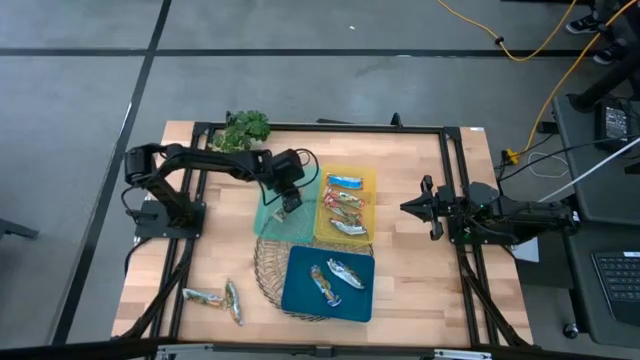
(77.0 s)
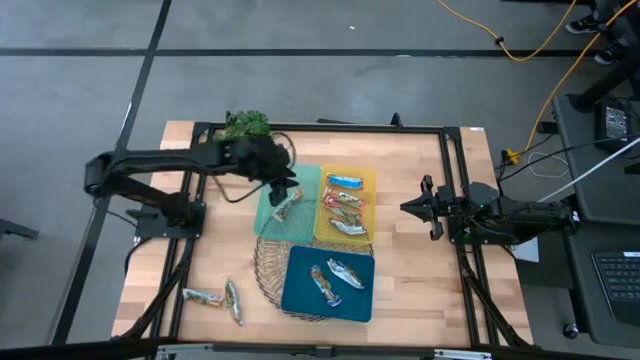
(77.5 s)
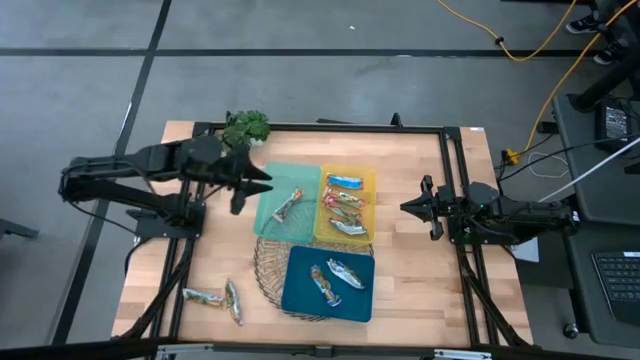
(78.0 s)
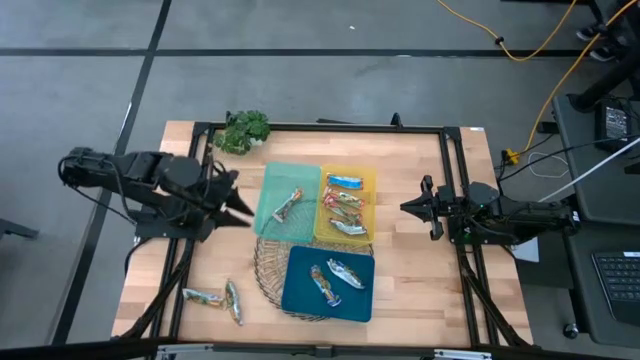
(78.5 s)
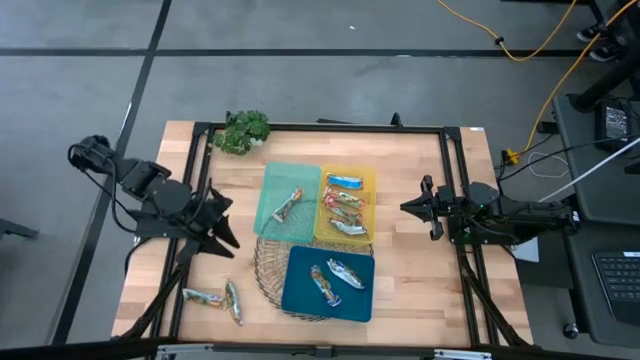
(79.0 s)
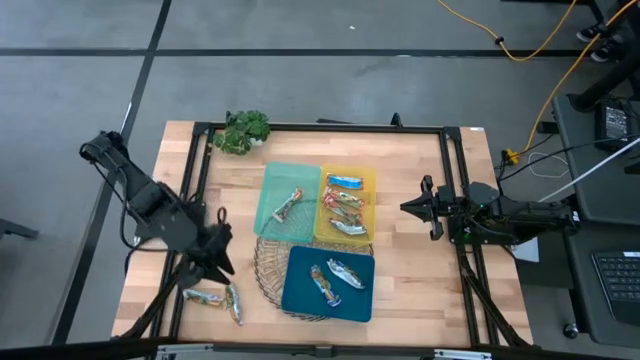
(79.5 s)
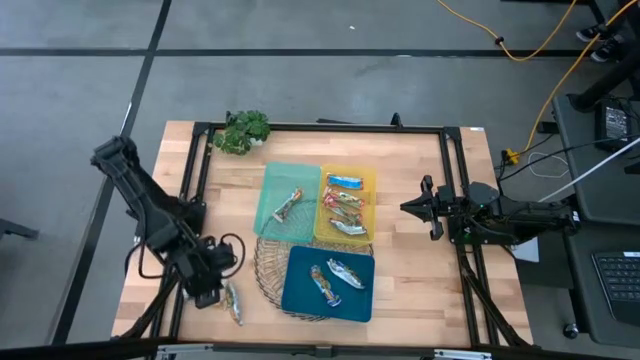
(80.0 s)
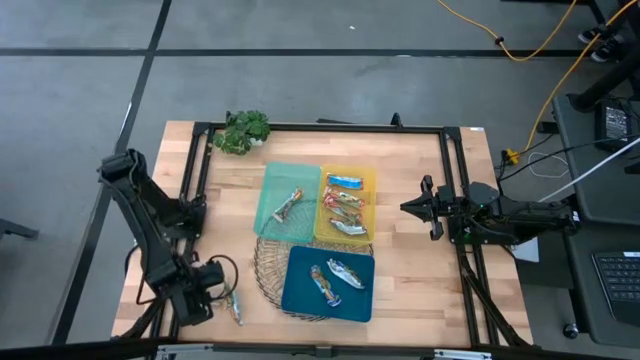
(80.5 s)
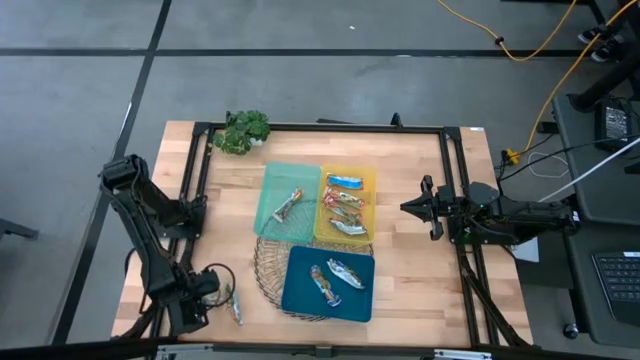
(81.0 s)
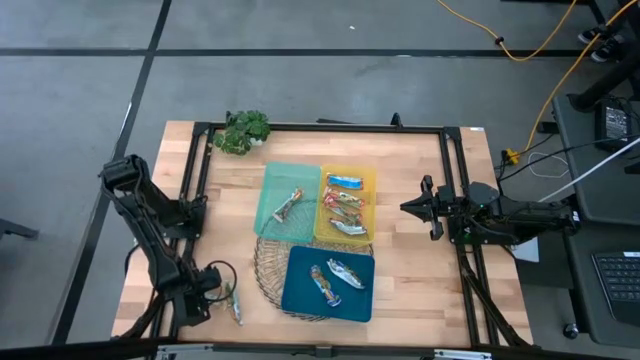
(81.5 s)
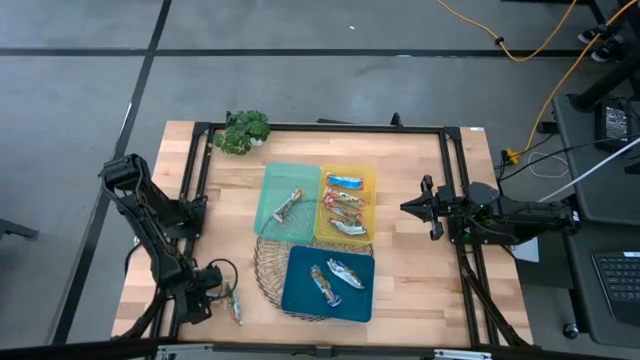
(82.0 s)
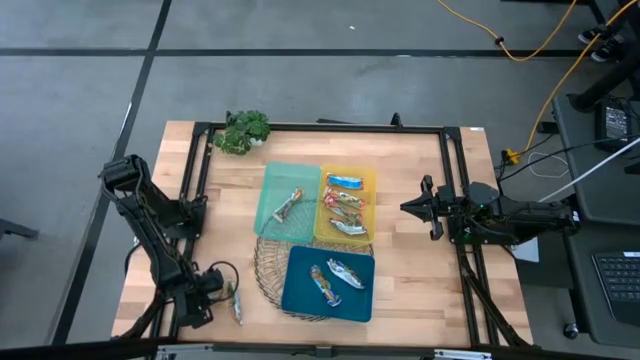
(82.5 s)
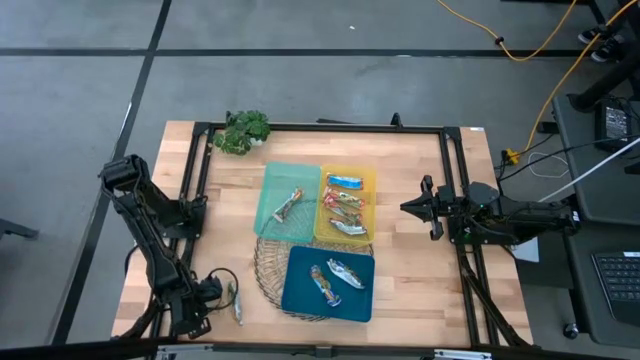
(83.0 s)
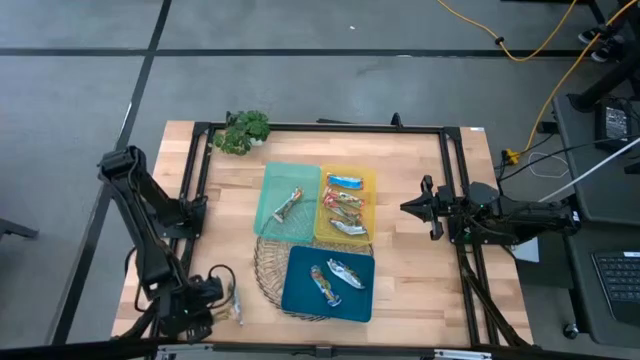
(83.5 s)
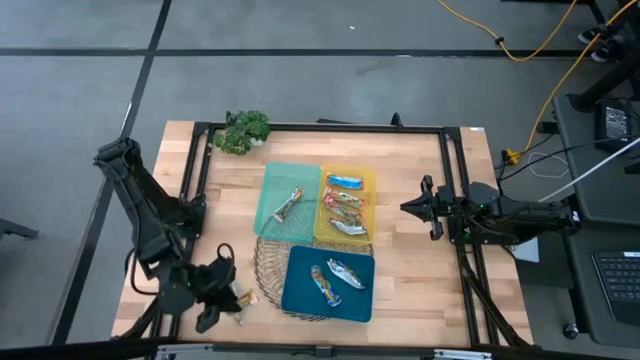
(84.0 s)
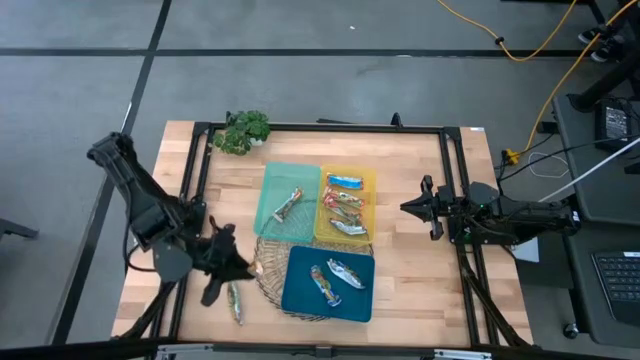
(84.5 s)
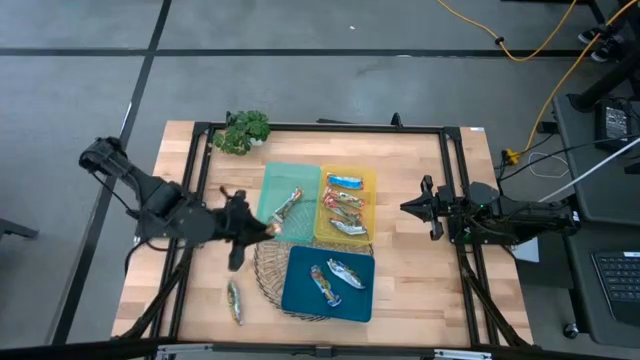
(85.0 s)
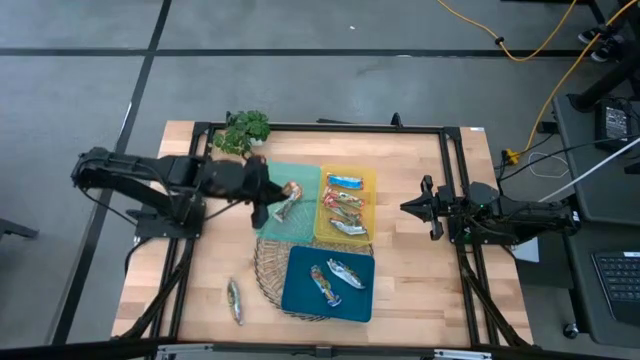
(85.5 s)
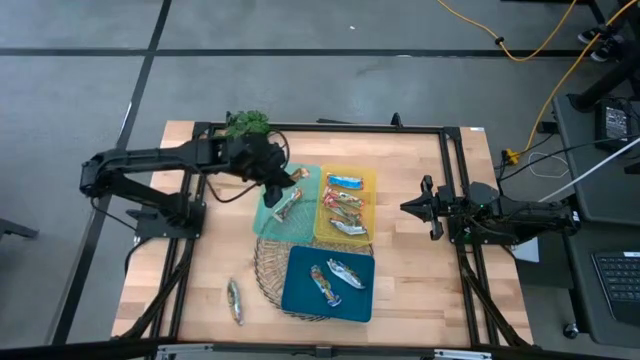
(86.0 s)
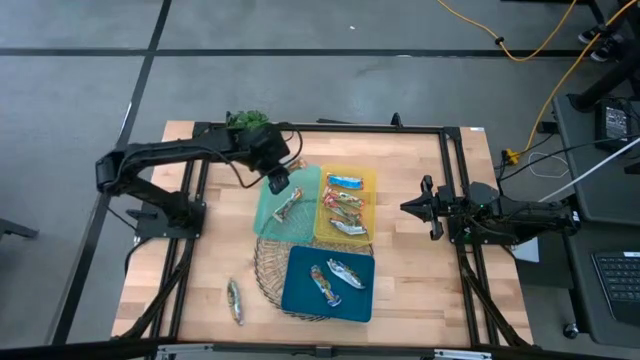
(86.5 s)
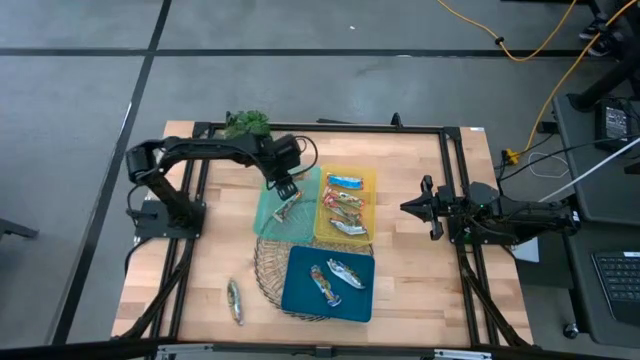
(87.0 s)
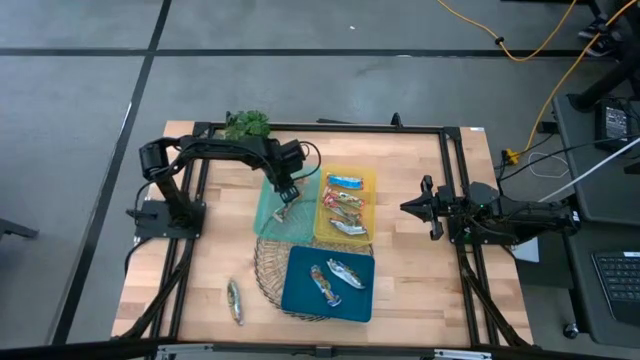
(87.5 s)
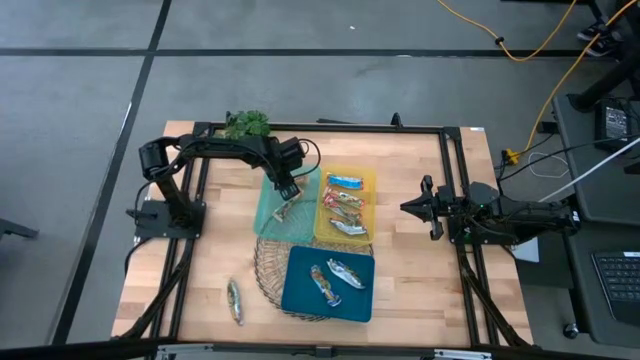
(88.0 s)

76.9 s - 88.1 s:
Task: Pick and place Granola Bars by type
Put the yellow granola bar into the green bin

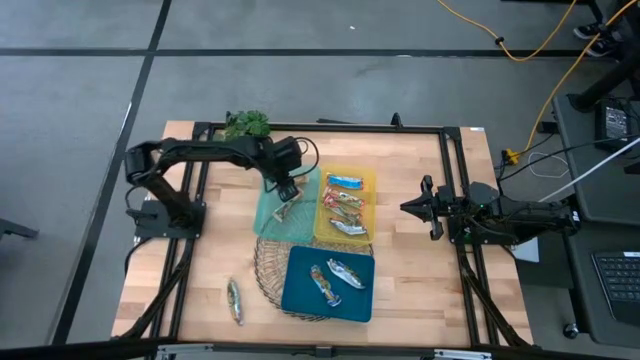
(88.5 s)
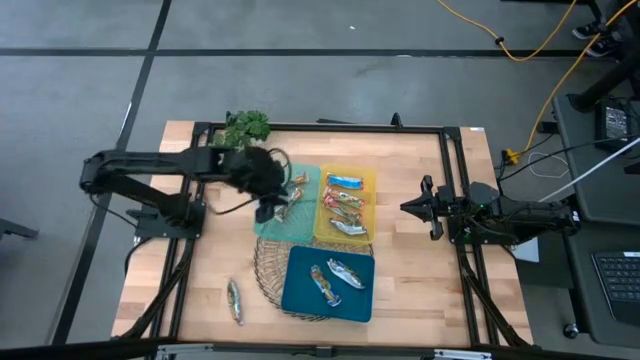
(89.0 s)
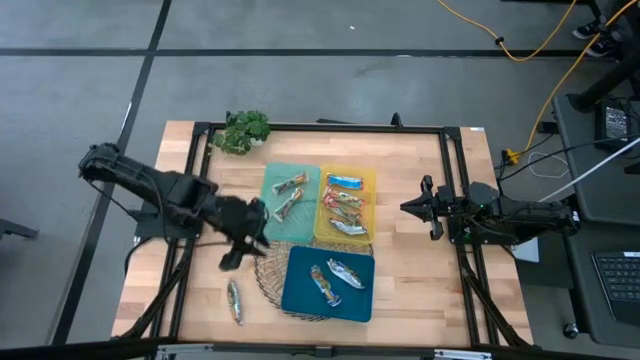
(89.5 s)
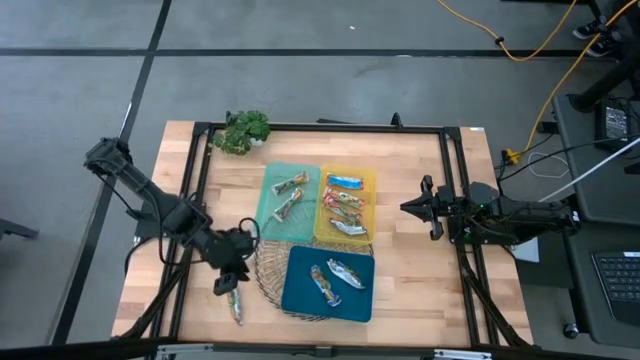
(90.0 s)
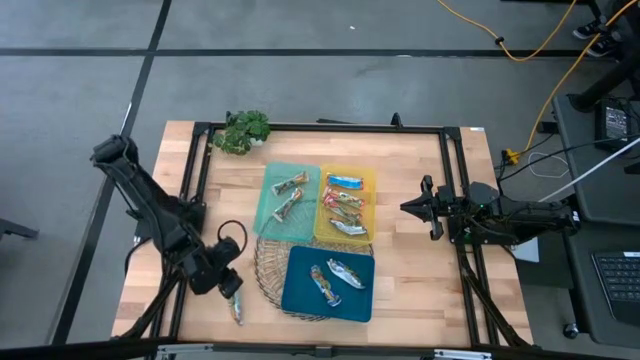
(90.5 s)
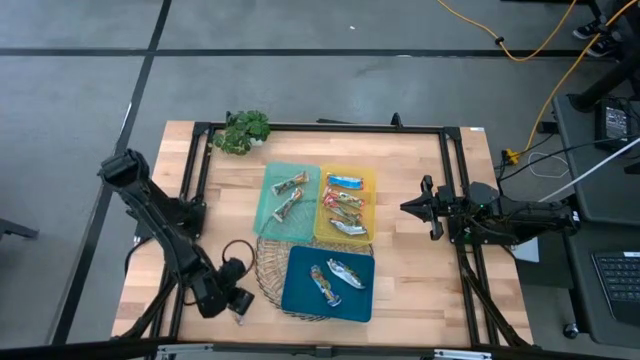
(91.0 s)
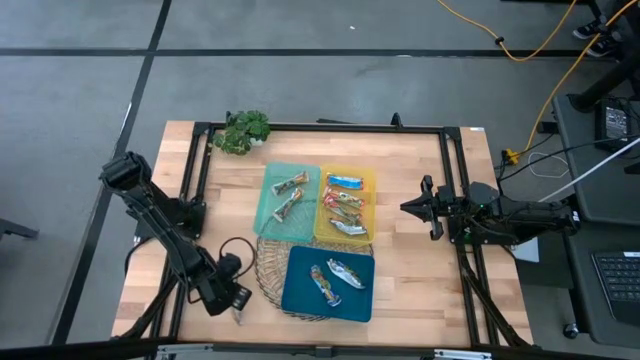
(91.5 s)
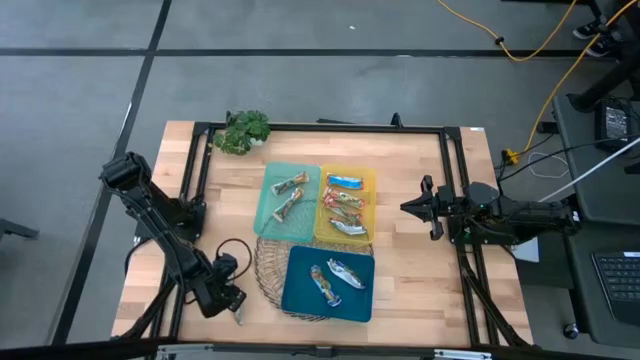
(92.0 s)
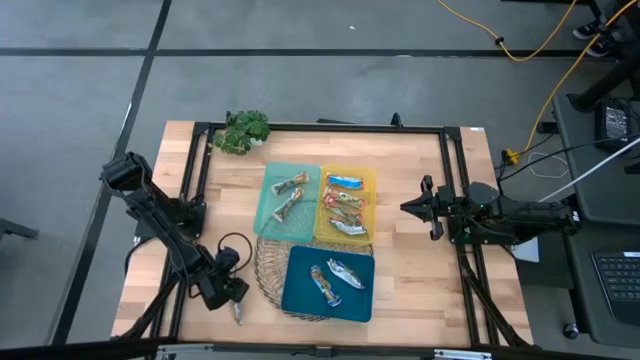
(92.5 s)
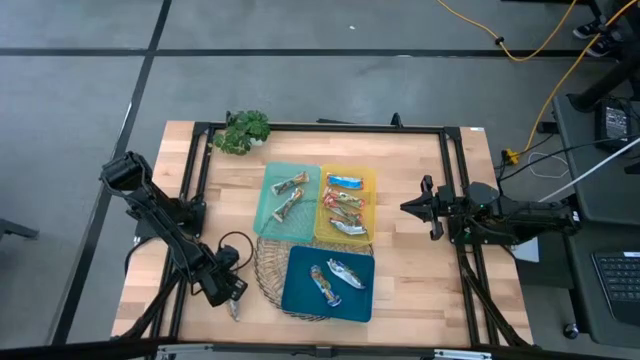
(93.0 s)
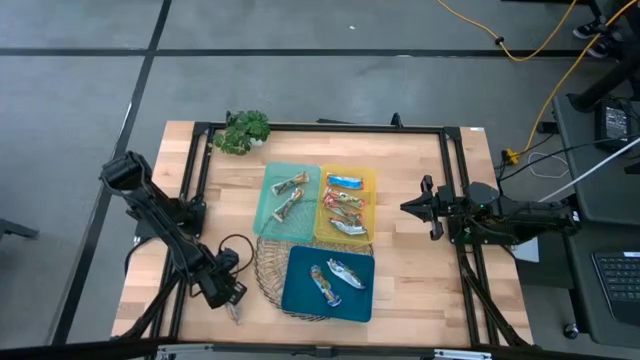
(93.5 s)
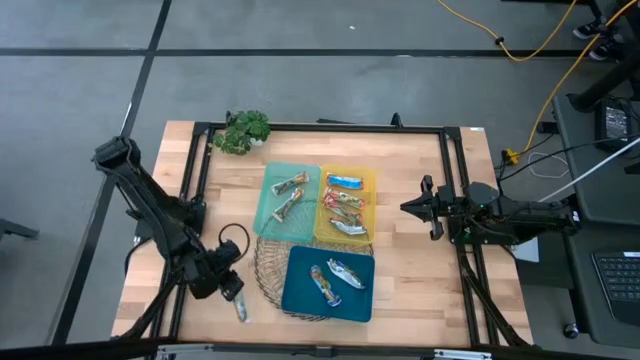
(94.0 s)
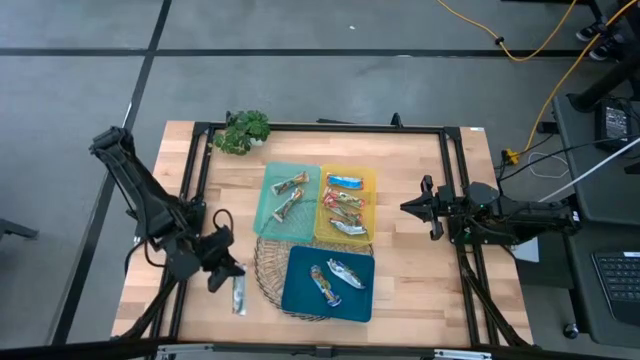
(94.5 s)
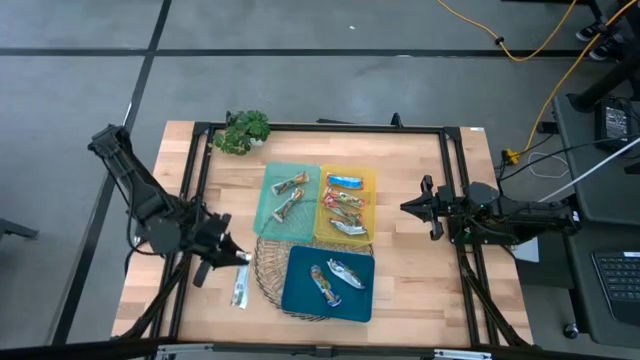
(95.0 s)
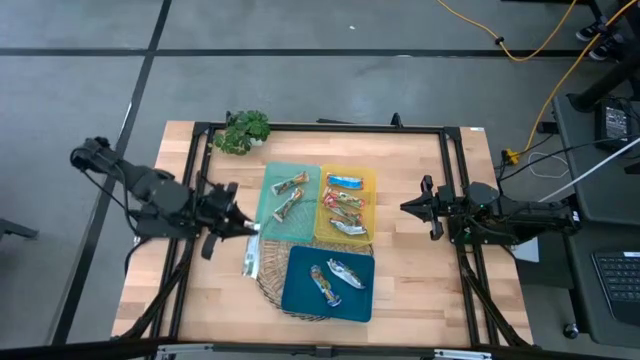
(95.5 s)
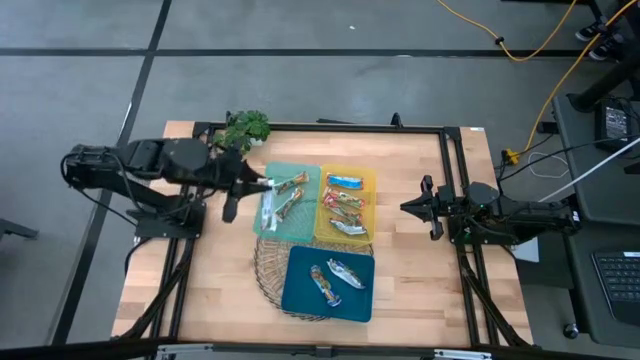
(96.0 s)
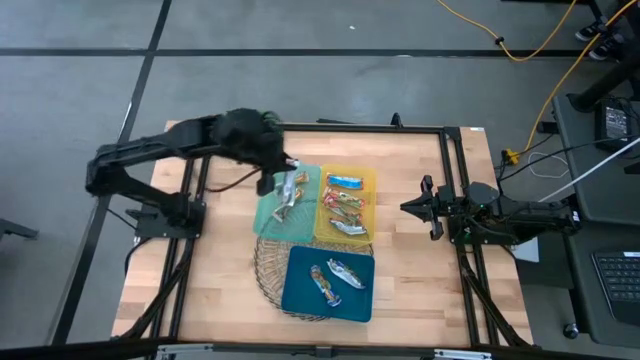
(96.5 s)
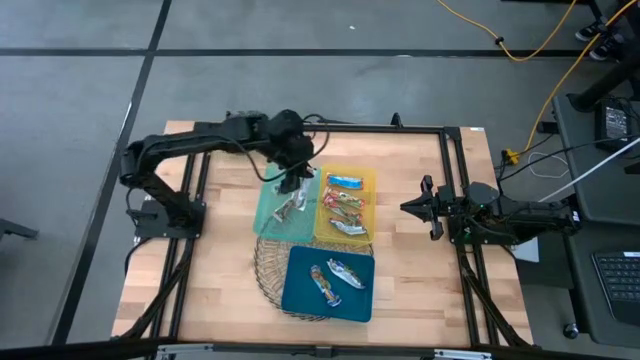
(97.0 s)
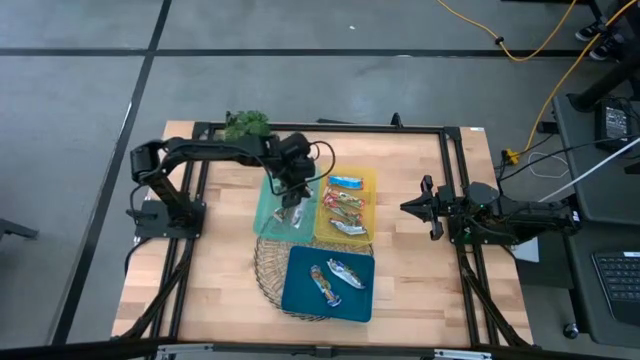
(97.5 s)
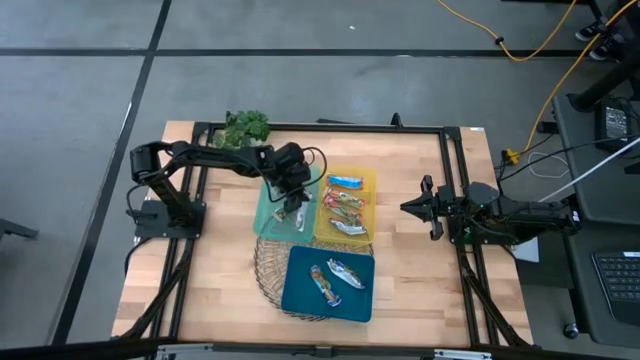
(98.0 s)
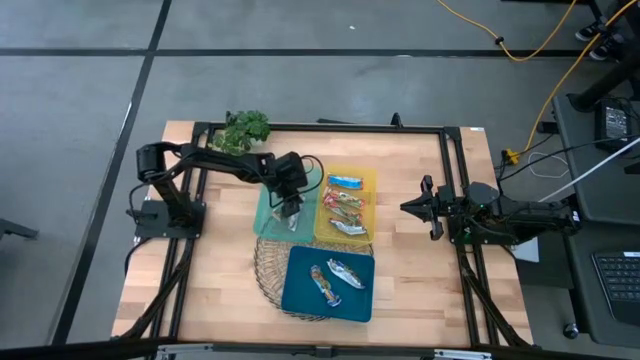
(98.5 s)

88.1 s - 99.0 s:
Put the yellow granola bar into the green bin
